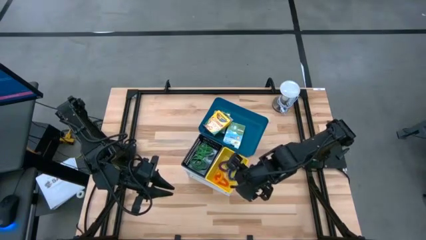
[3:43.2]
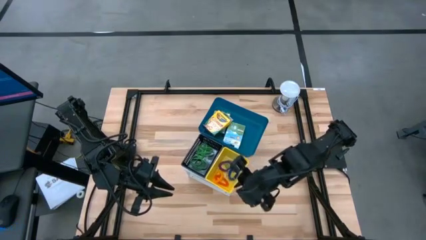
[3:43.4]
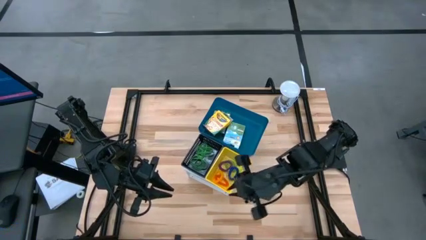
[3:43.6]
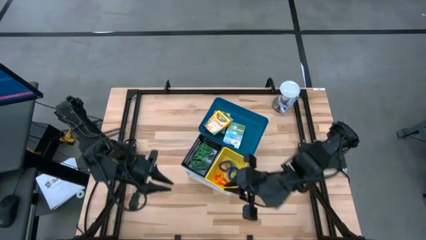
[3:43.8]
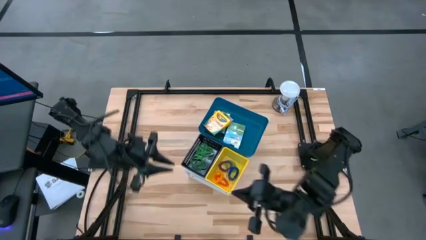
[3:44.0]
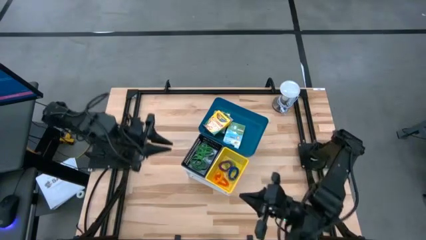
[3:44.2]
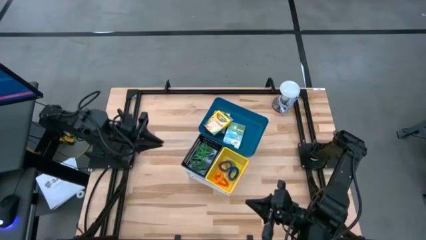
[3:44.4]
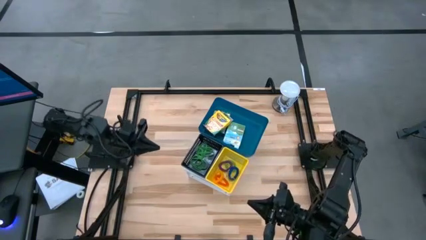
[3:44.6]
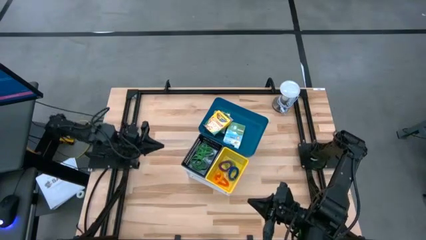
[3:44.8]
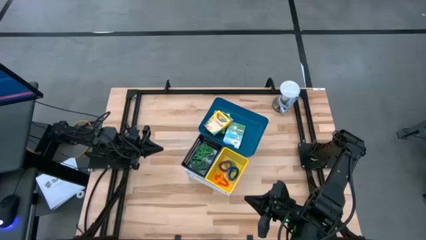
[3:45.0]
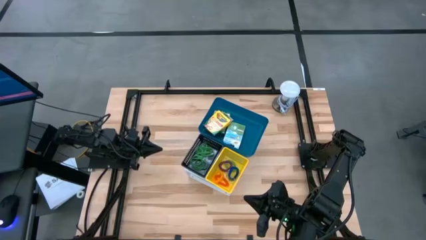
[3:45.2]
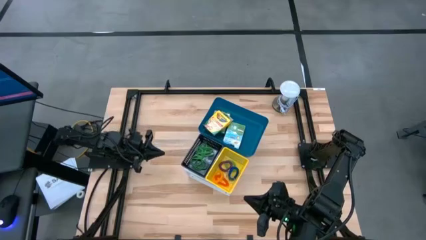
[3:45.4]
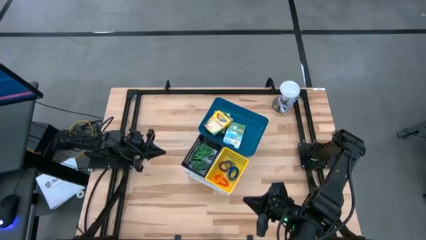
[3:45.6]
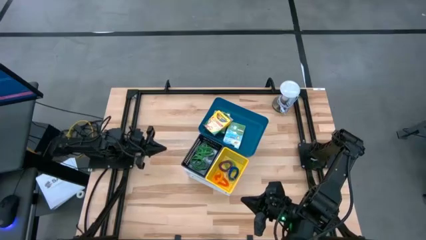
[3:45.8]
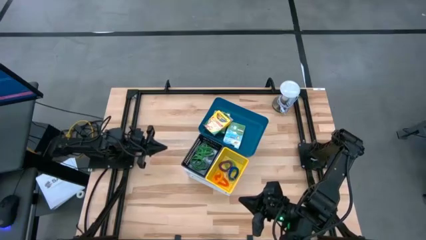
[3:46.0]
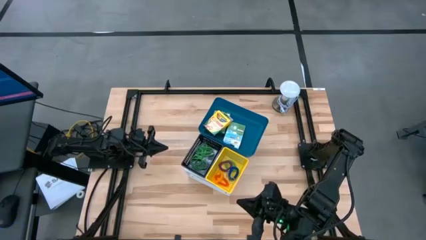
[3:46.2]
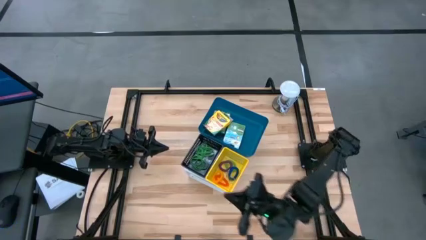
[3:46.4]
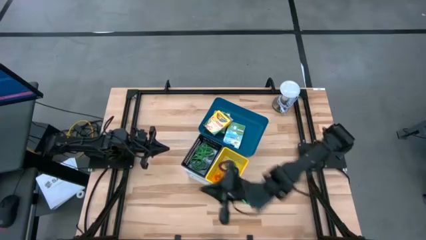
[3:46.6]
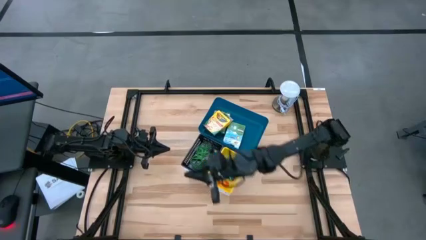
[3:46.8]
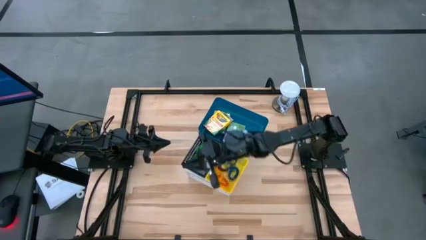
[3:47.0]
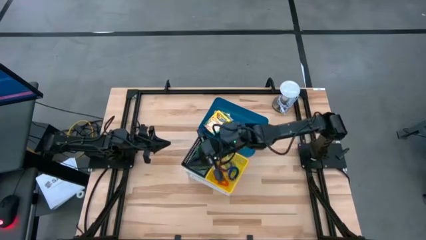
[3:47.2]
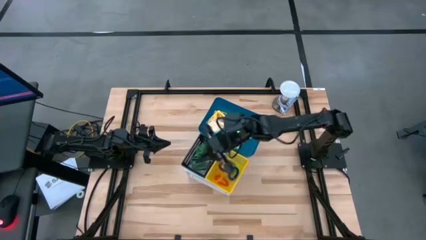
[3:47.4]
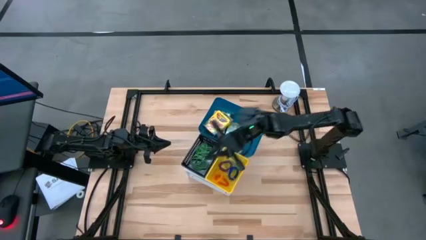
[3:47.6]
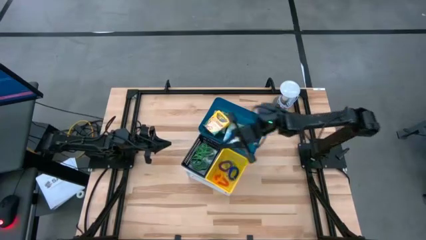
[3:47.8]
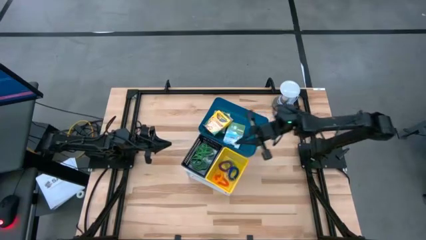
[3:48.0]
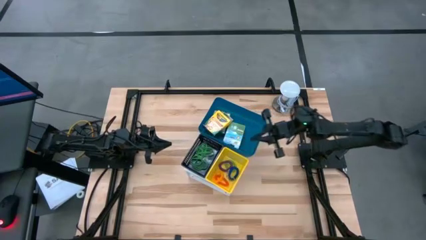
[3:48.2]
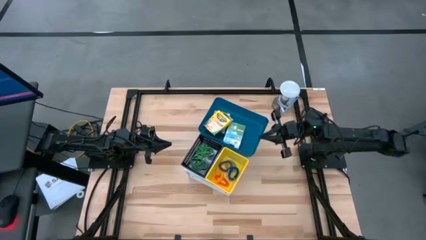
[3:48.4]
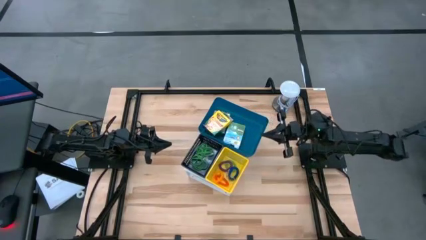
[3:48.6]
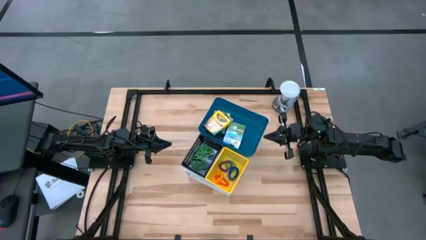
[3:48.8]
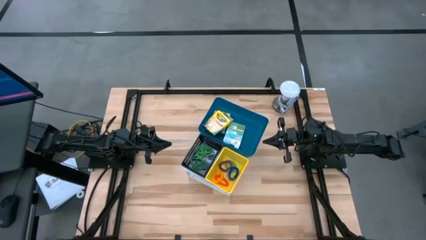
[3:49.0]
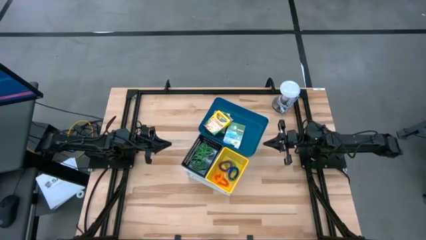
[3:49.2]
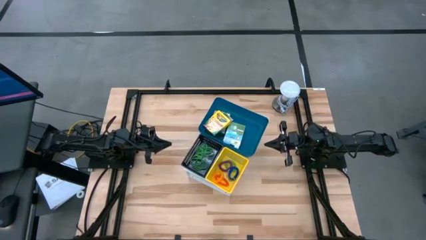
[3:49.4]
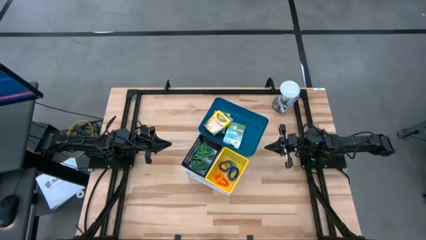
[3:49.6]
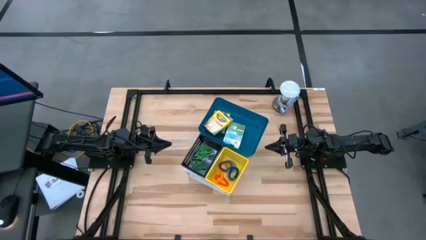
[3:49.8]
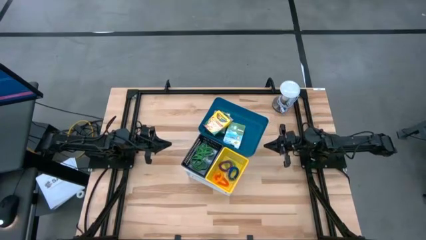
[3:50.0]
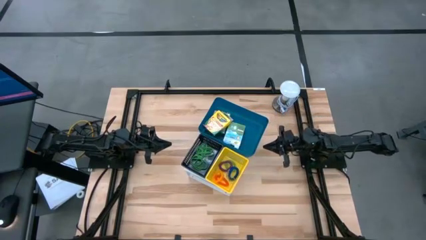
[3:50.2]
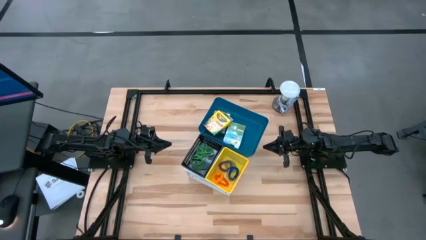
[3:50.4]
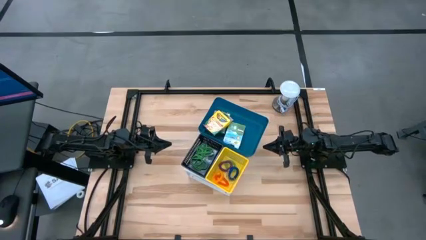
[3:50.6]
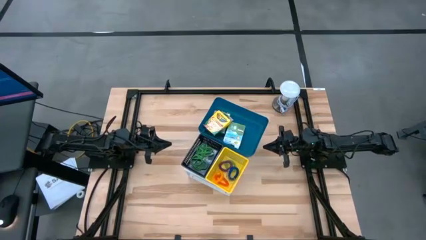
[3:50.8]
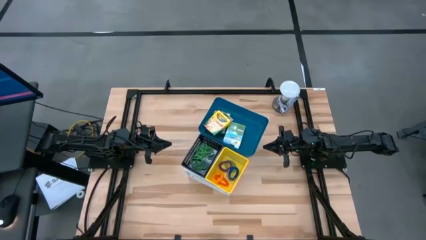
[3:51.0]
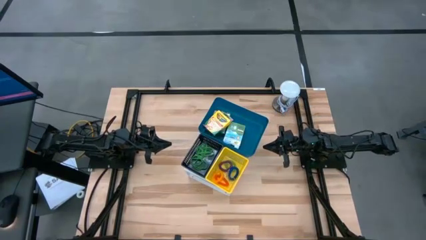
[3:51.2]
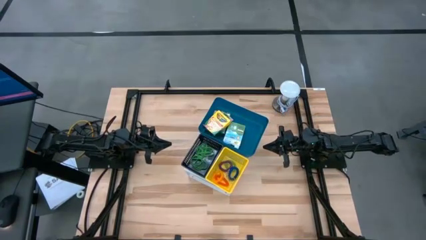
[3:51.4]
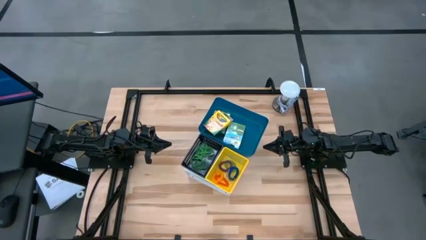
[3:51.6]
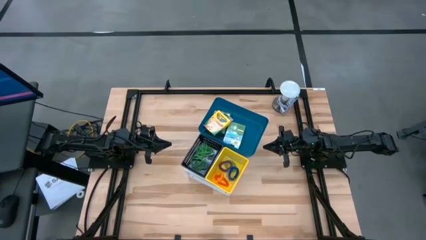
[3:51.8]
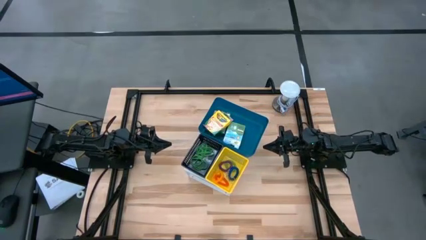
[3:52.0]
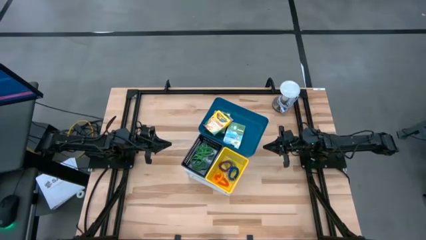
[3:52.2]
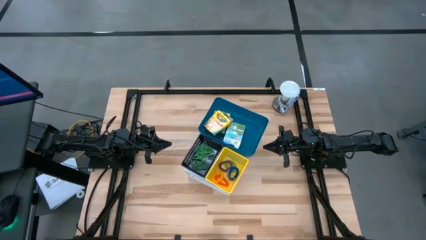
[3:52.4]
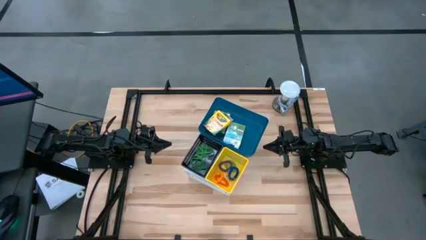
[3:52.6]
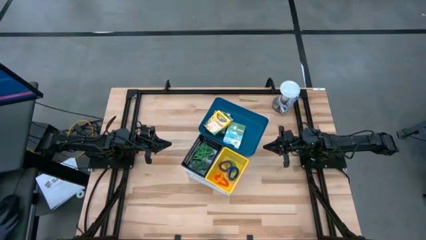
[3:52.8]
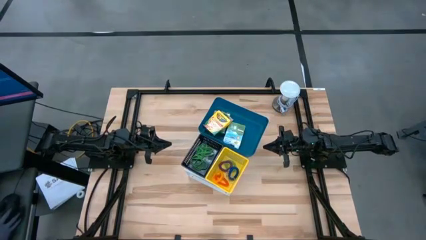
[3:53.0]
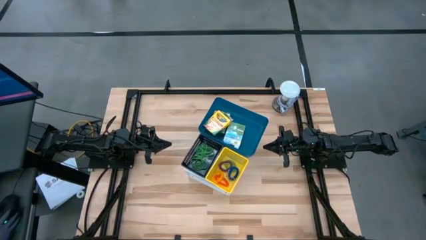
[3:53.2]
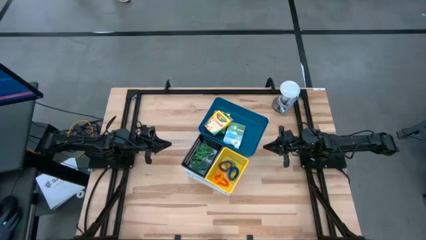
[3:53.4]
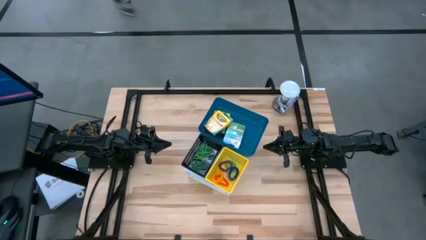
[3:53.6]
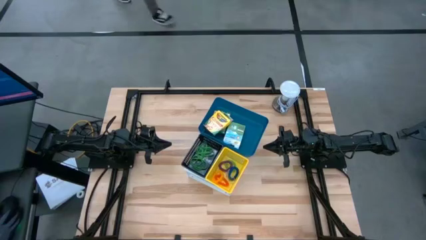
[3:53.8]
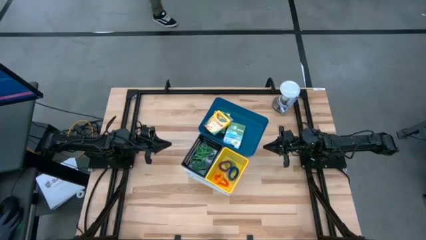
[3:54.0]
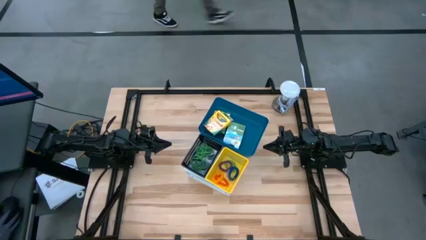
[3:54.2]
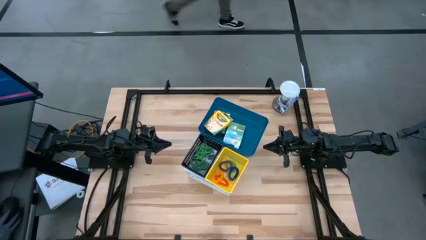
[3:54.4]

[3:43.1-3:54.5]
Task: Pick & Place Office Desk Supplies
Return to Home Position
